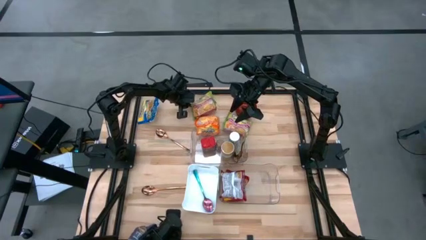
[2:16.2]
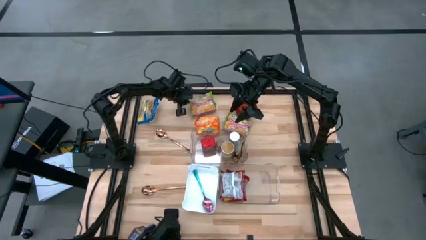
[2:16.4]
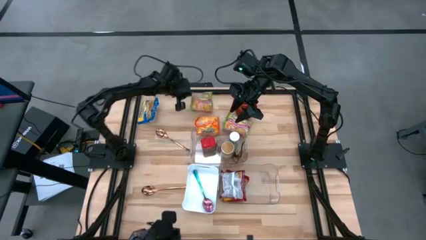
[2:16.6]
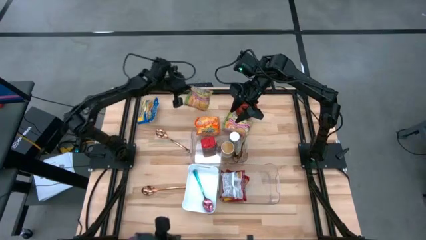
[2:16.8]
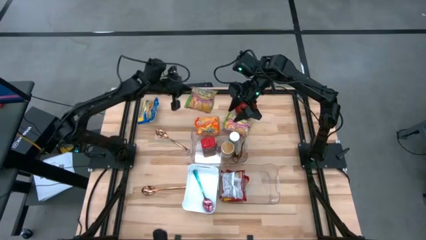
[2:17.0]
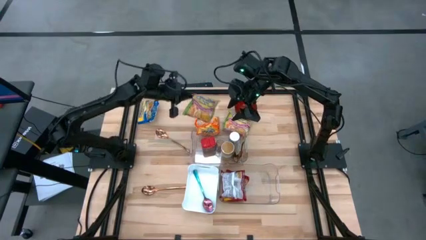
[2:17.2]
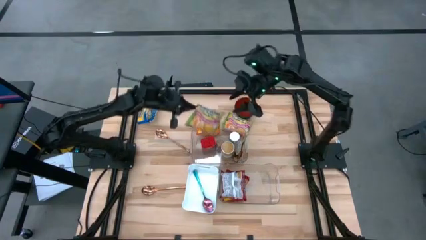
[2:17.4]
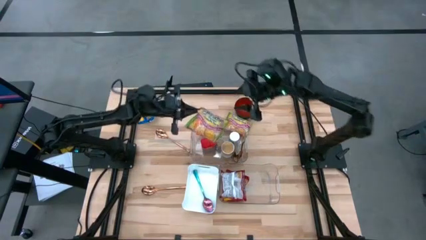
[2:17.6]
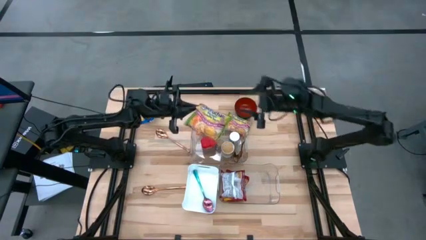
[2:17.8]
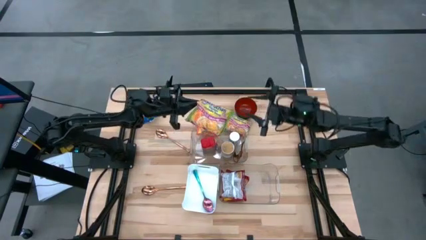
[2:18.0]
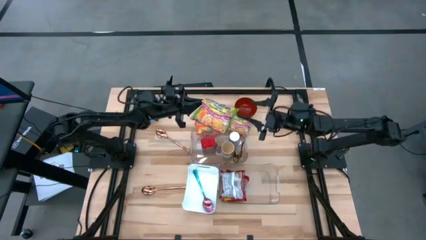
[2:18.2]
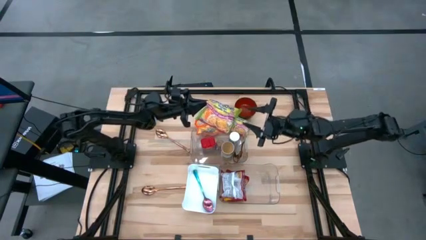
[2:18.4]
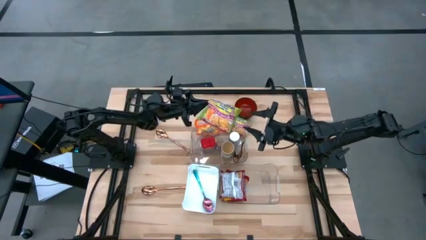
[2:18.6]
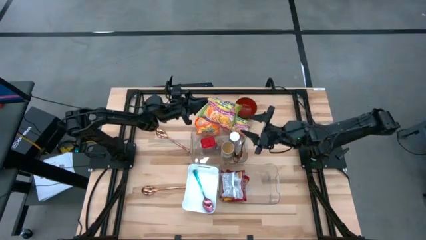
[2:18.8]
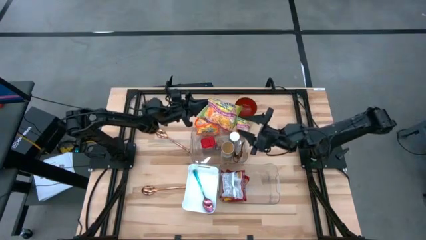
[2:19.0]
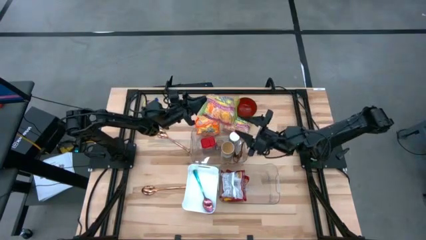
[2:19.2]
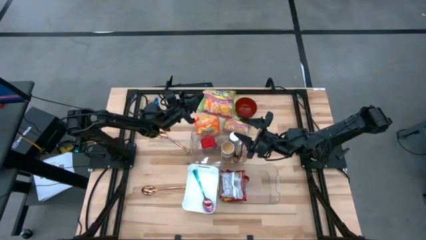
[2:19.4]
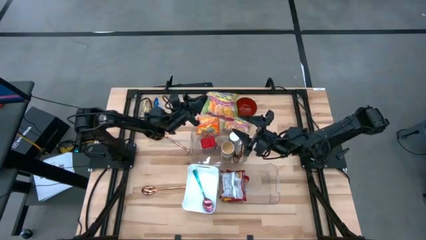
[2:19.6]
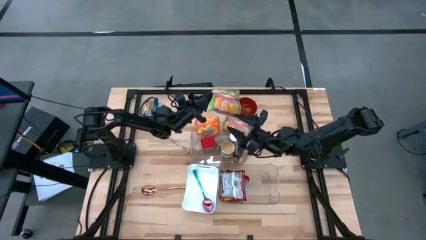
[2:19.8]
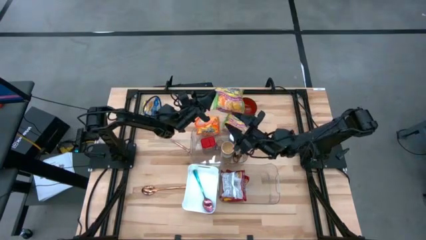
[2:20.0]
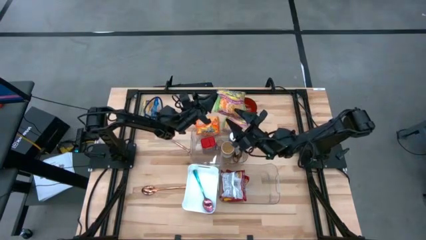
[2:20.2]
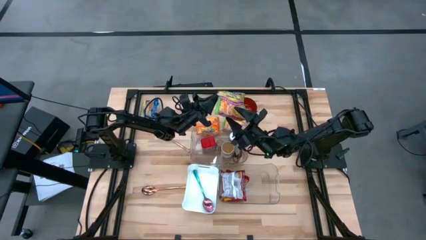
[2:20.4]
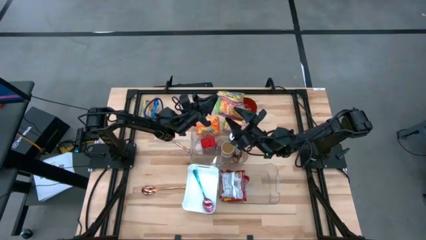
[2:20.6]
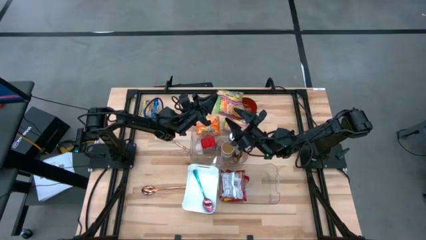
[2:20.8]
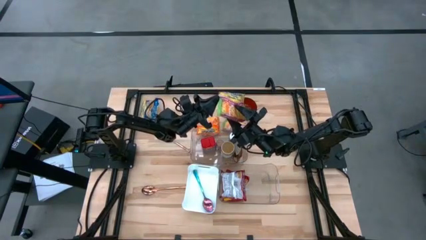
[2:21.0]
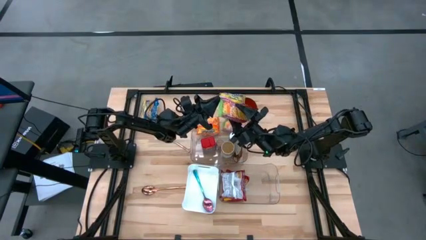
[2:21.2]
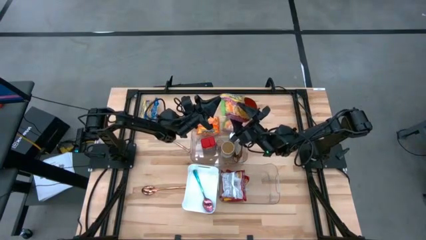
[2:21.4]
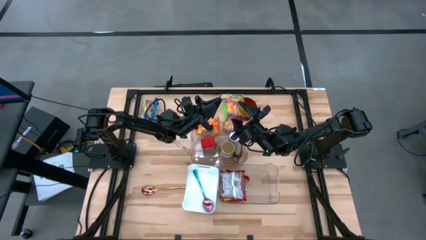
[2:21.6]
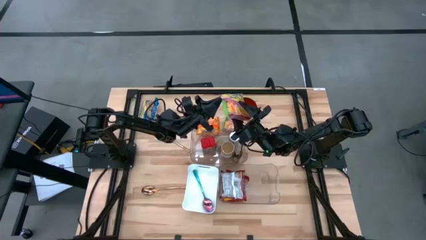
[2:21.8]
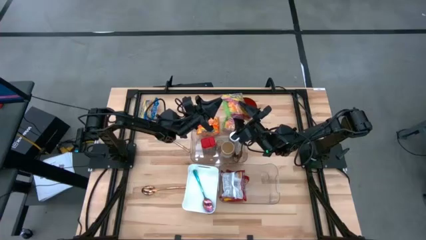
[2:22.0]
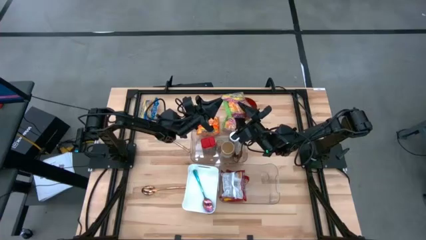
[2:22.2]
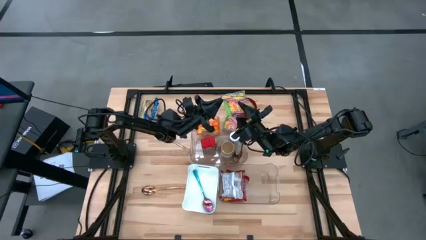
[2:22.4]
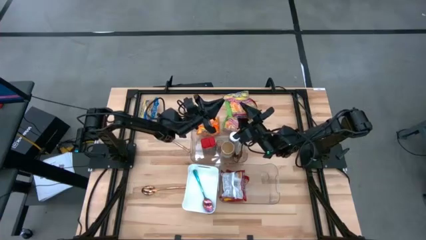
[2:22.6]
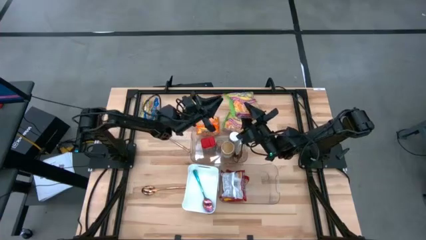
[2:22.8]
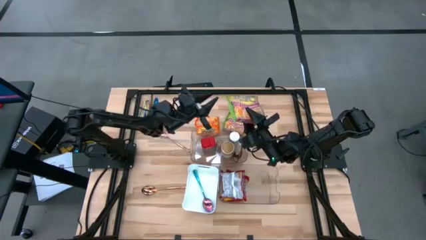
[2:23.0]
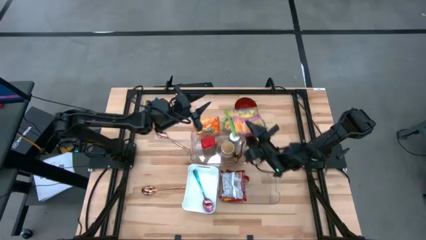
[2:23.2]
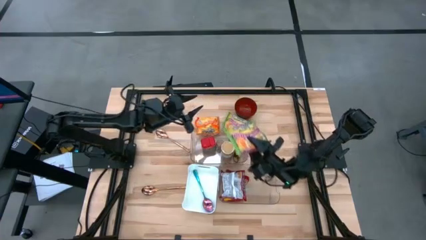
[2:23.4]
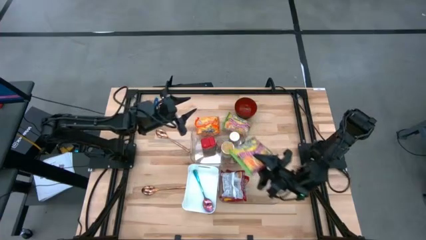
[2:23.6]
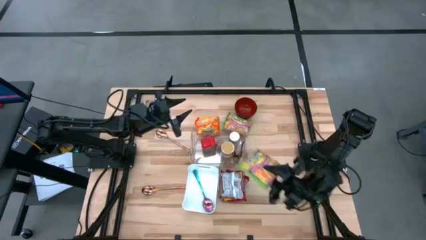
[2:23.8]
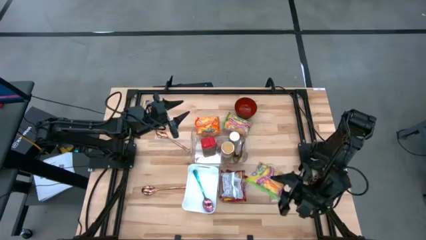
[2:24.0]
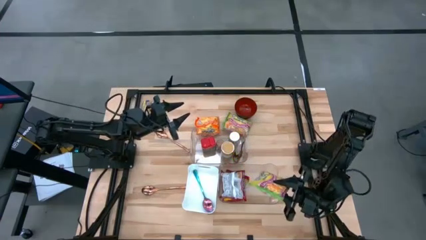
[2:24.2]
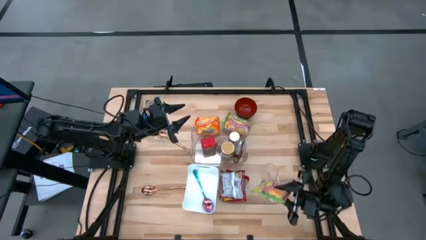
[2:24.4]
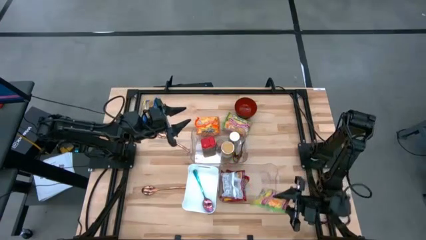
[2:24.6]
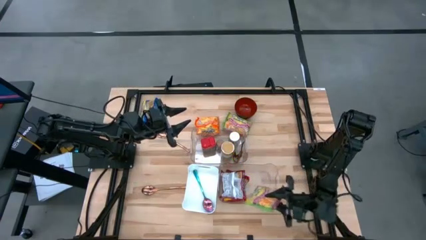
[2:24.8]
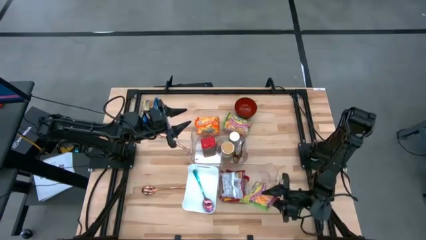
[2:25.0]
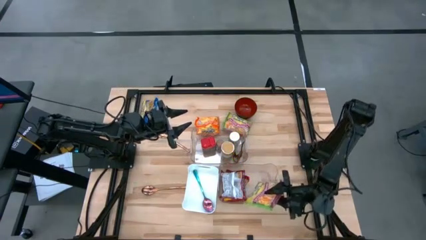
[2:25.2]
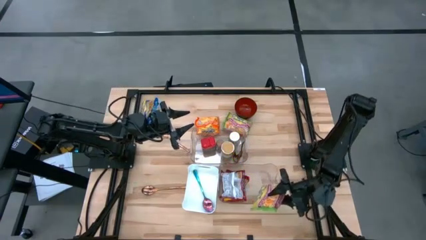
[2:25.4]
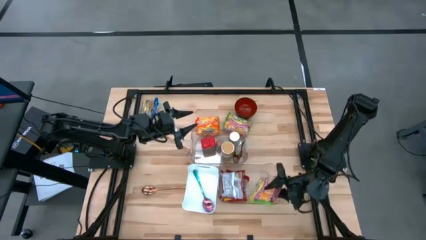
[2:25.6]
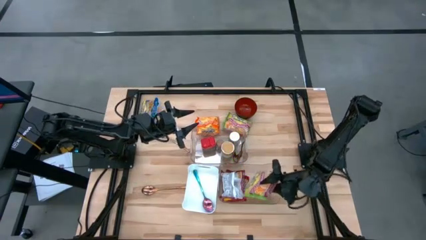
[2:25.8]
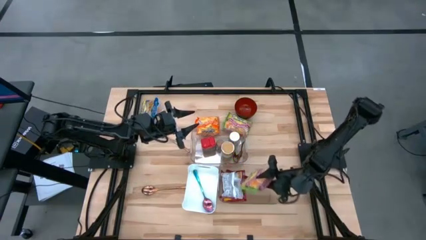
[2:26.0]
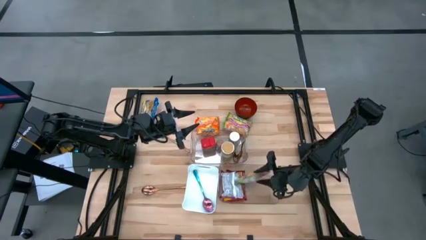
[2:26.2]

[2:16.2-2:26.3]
Task: Pick & Place Food Item
Put the top green noodle pack into the bottom transparent bin
